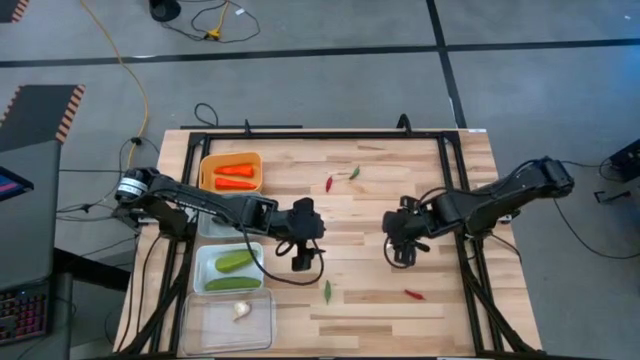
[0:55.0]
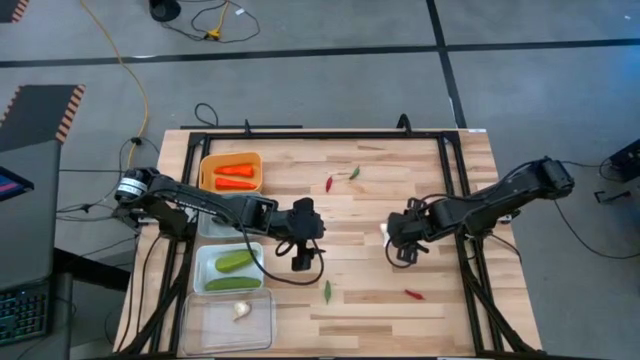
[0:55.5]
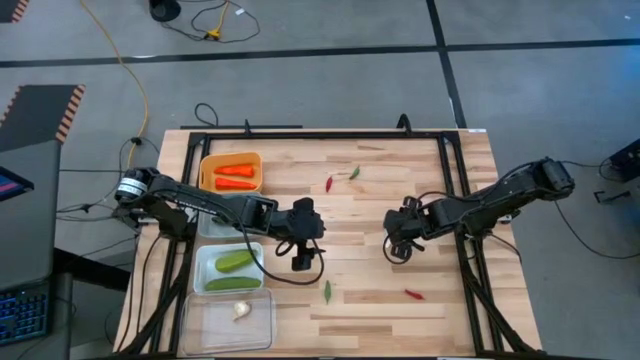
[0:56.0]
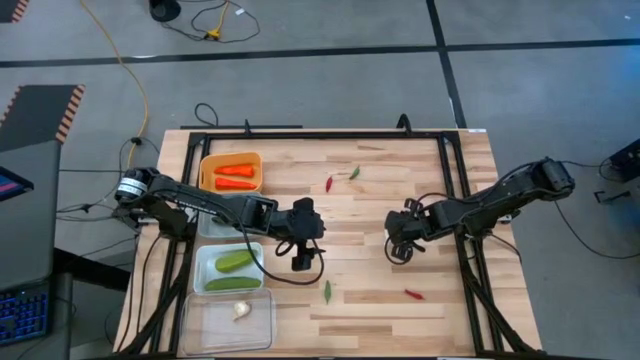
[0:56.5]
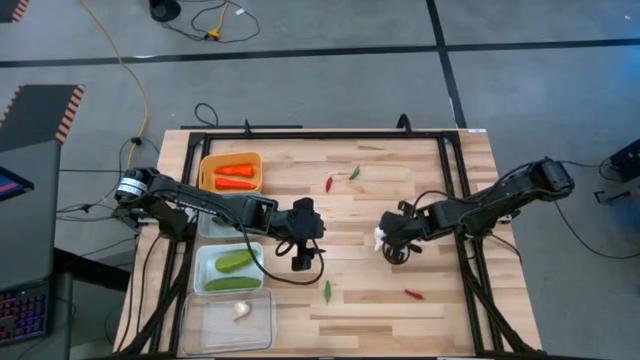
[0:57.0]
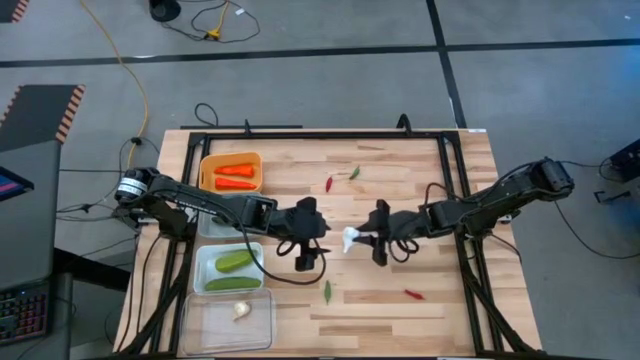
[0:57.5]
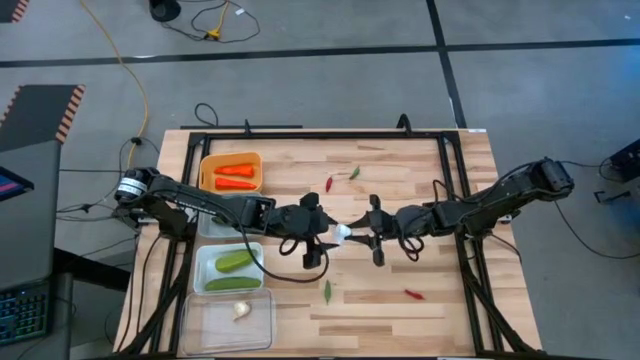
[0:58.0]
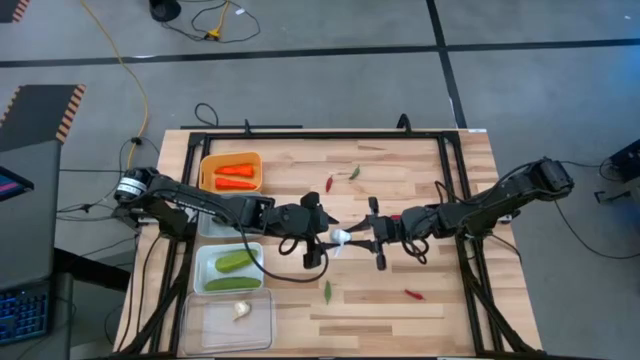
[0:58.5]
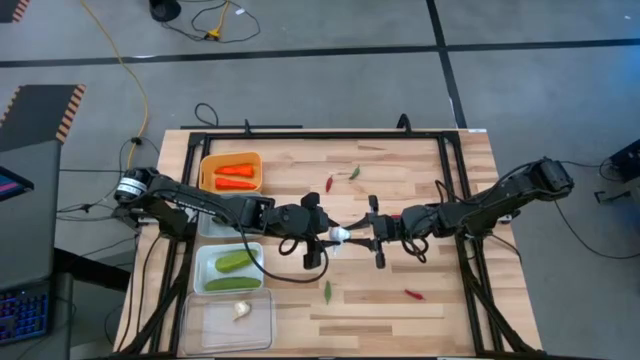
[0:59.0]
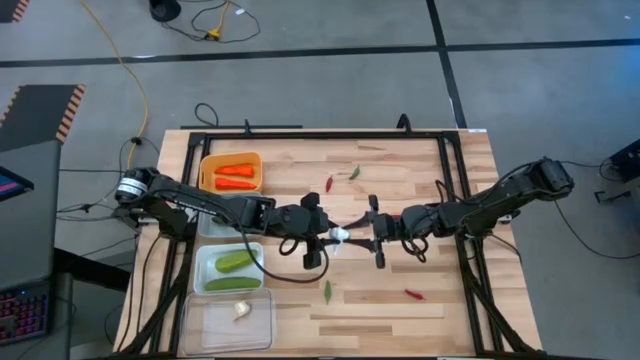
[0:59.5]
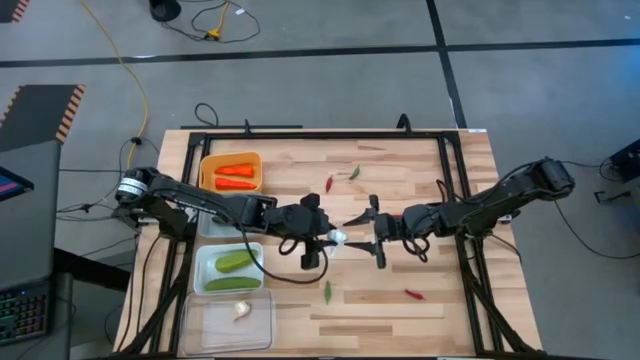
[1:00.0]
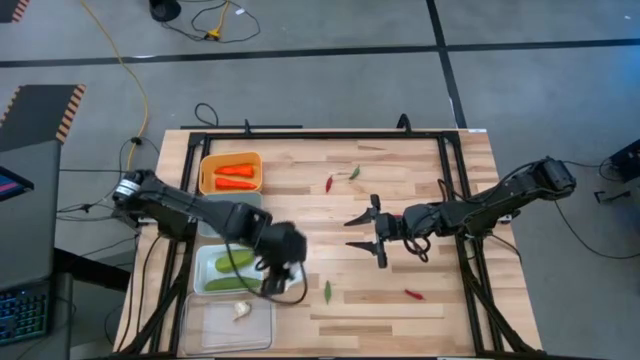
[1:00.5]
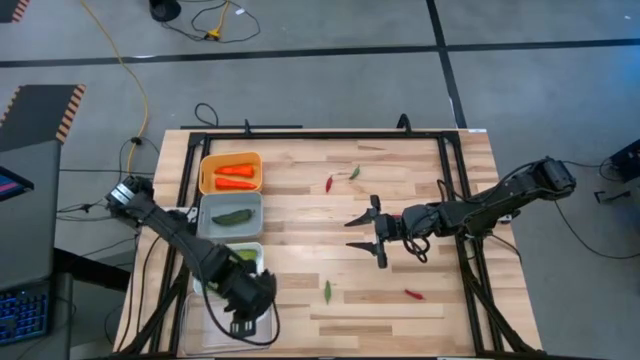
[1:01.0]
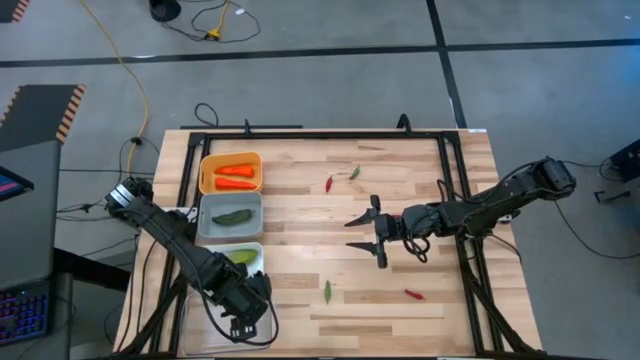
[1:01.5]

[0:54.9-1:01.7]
Task: Sort produce into baskets
Put the garlic into the transparent bin

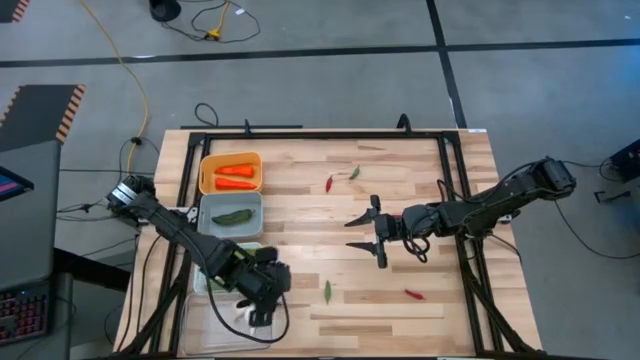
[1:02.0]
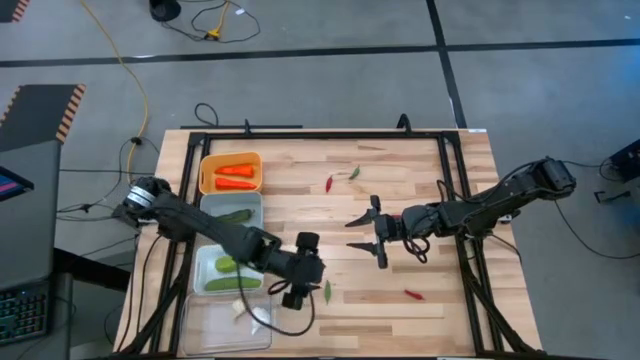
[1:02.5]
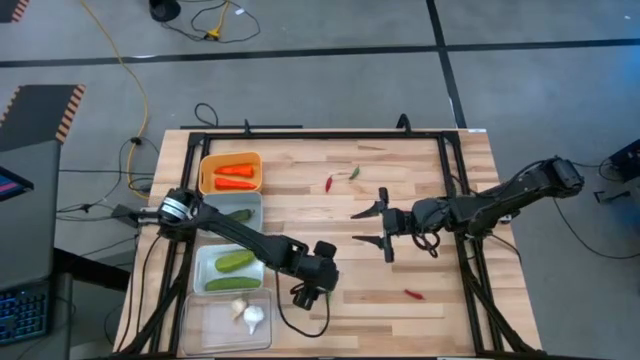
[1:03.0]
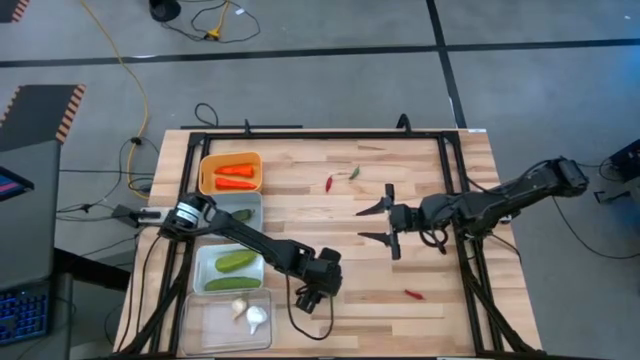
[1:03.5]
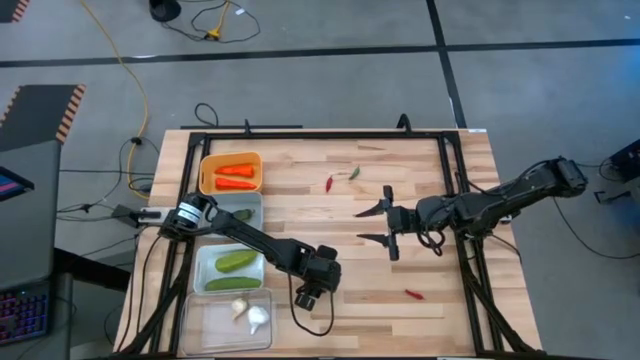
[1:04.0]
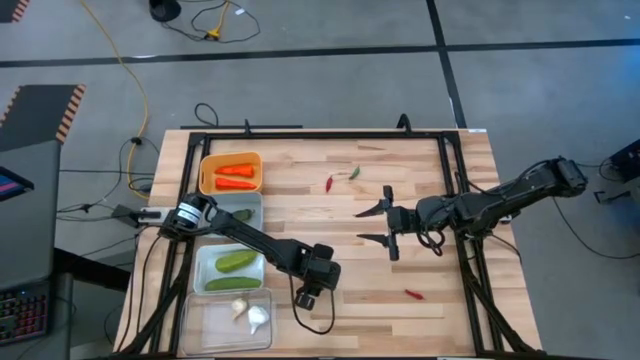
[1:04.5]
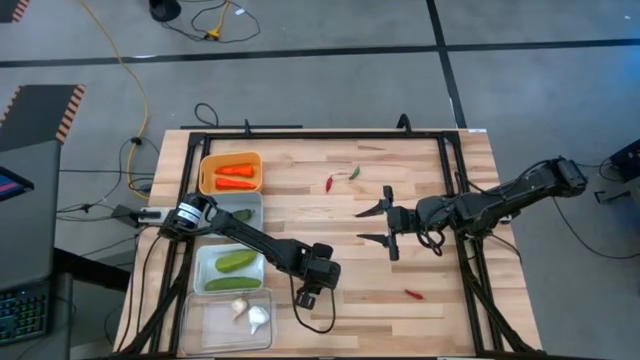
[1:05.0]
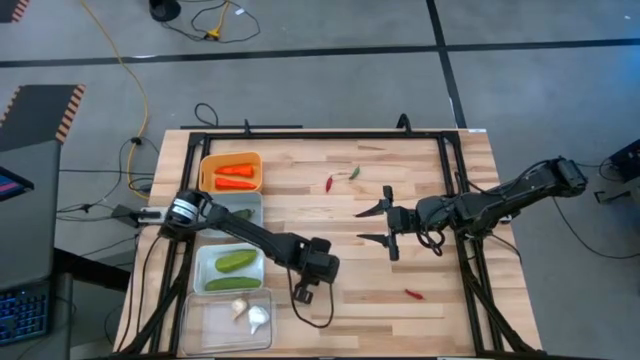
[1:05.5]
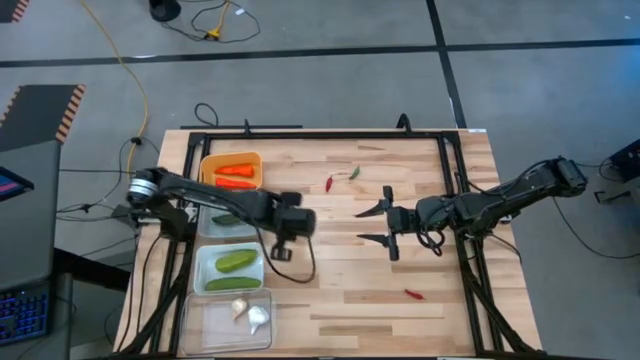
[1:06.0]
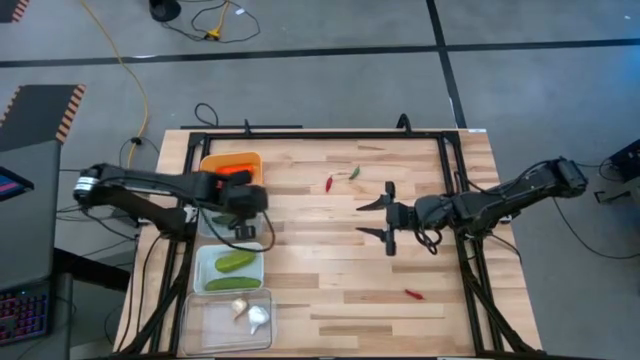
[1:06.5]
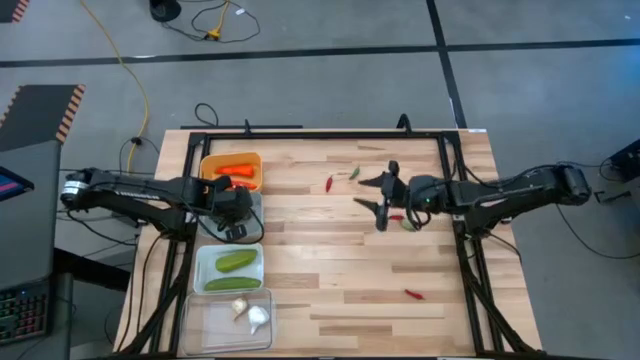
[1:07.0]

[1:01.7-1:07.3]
Put the bottom left green chili pepper into the gray bin

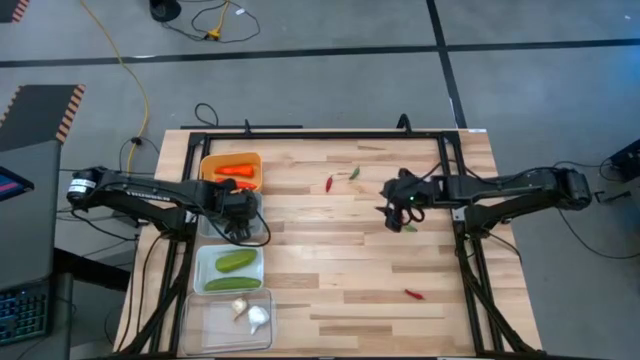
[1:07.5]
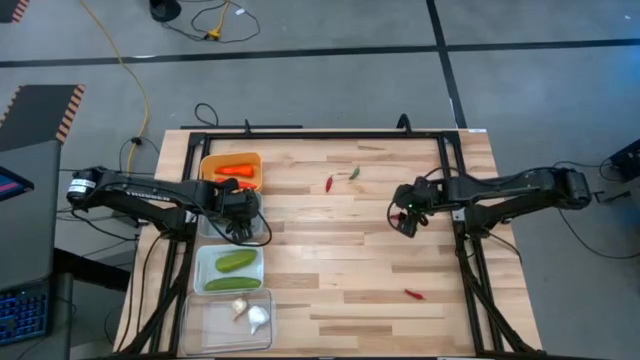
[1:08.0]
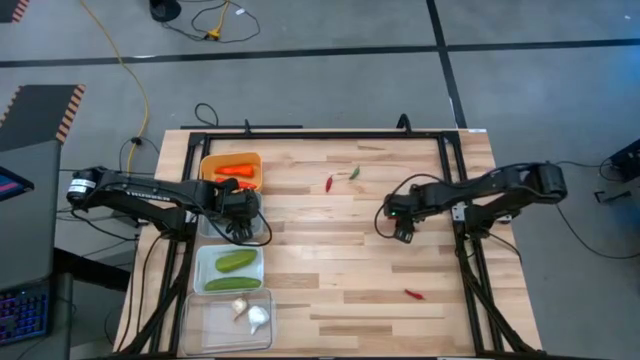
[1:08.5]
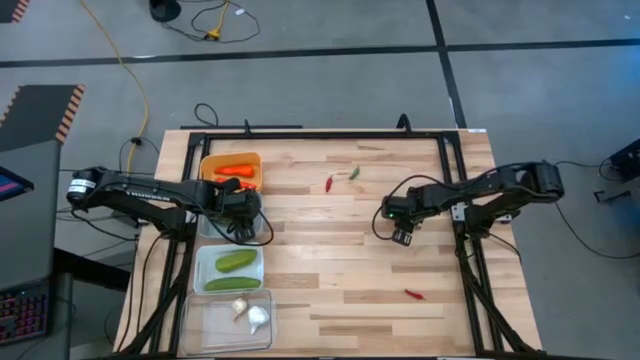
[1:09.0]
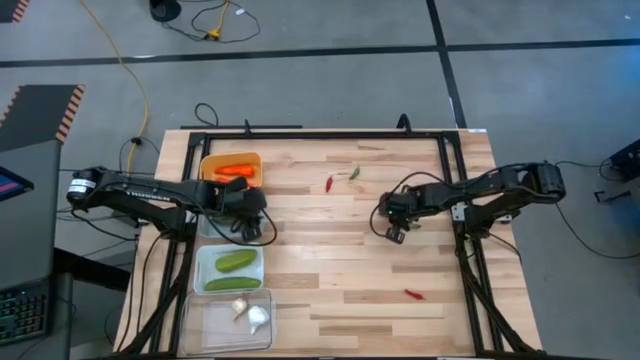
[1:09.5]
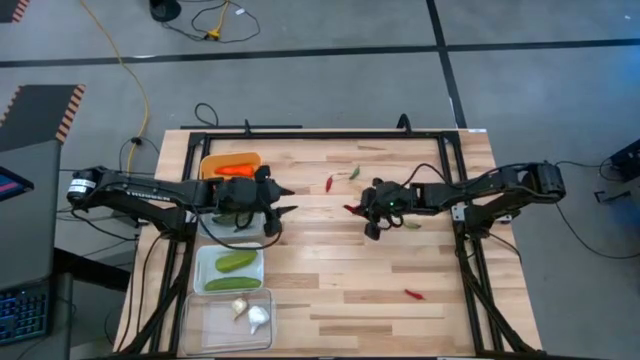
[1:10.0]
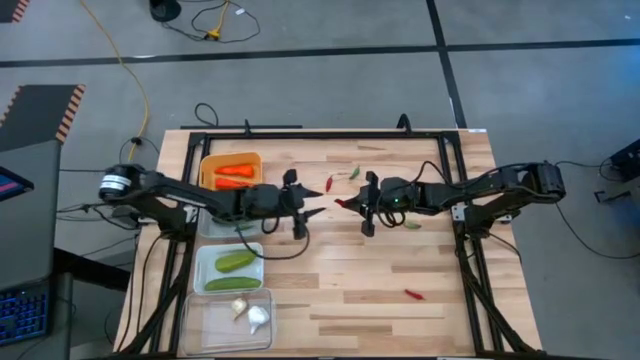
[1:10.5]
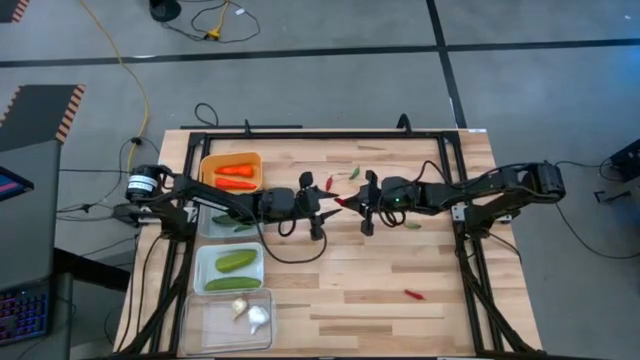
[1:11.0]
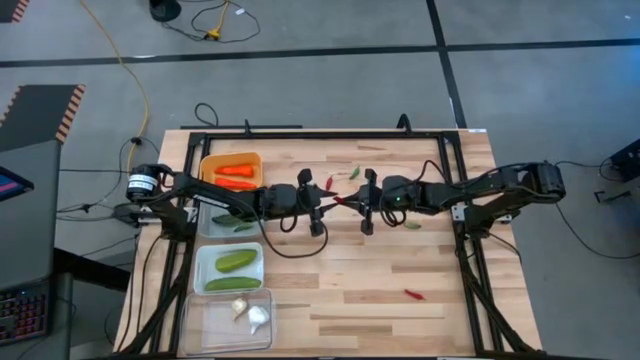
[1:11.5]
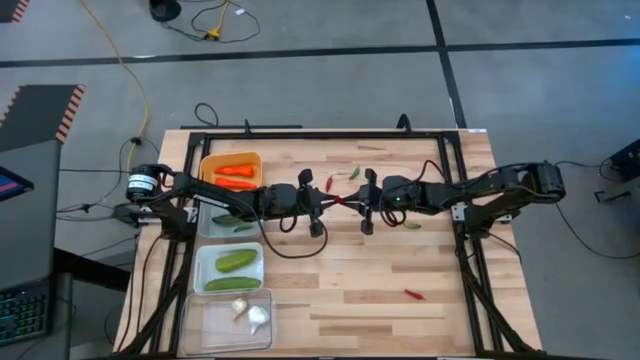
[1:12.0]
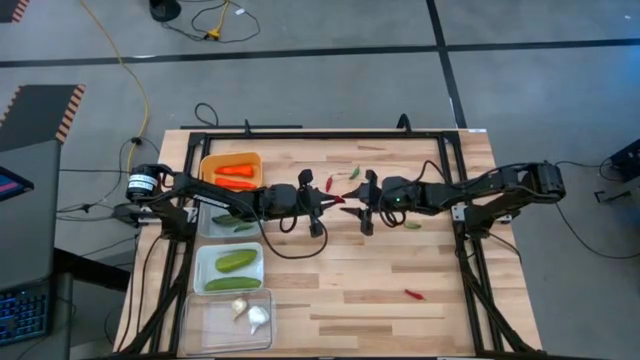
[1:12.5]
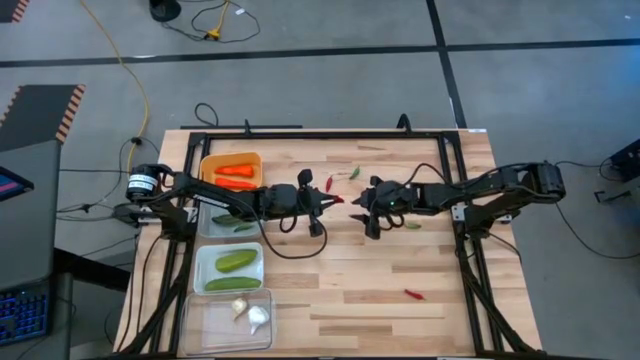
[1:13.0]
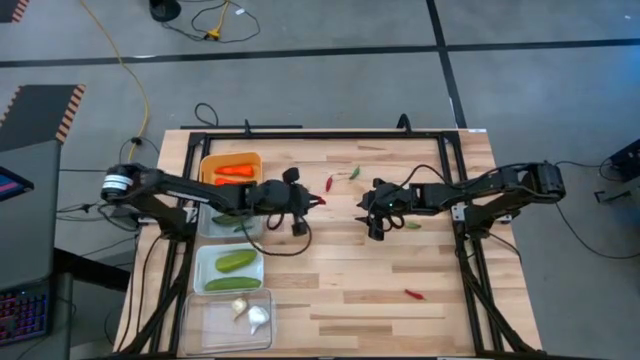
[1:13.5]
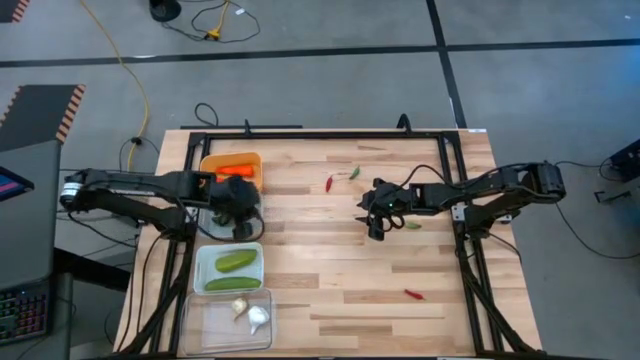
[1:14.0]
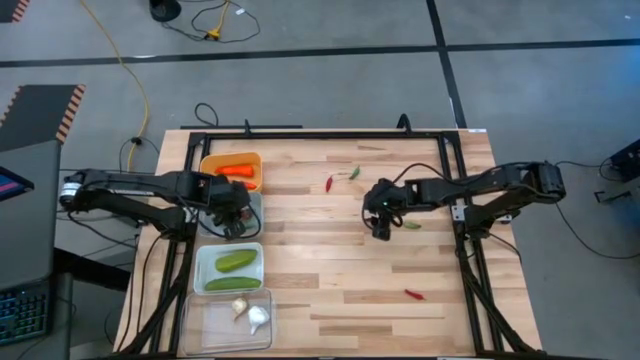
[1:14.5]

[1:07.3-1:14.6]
Put the middle right red chili pepper into the gray bin

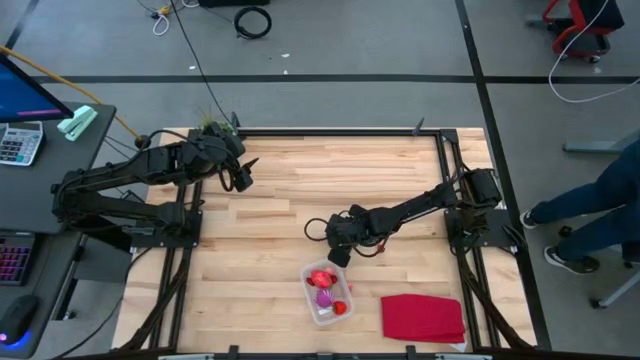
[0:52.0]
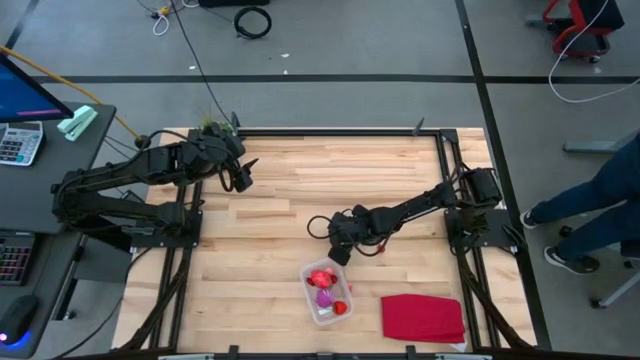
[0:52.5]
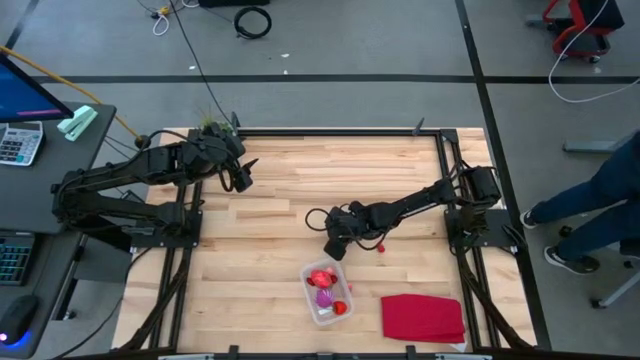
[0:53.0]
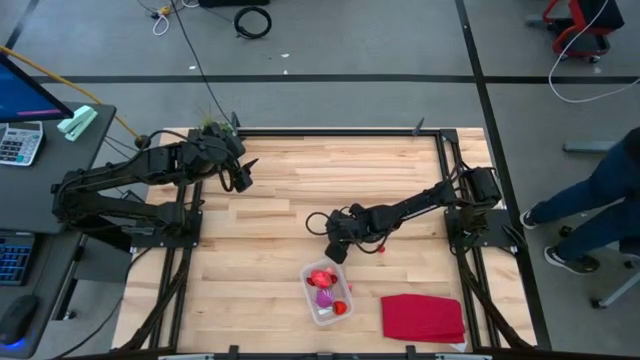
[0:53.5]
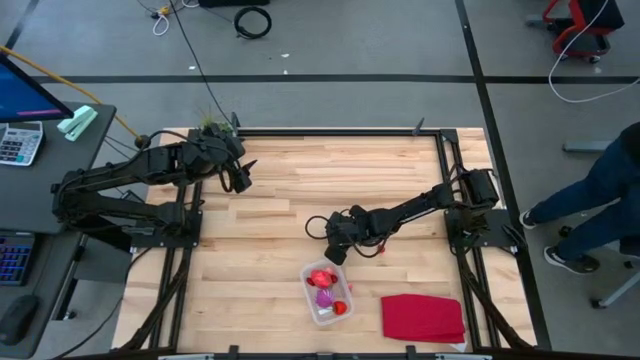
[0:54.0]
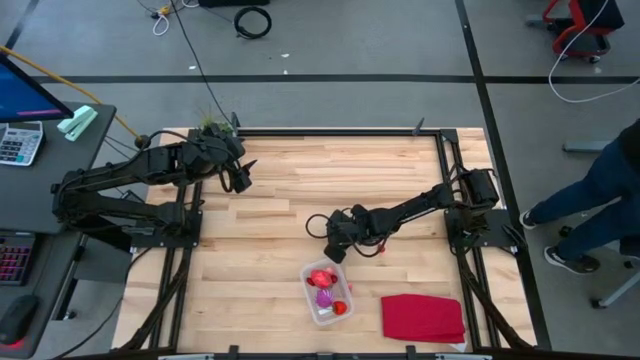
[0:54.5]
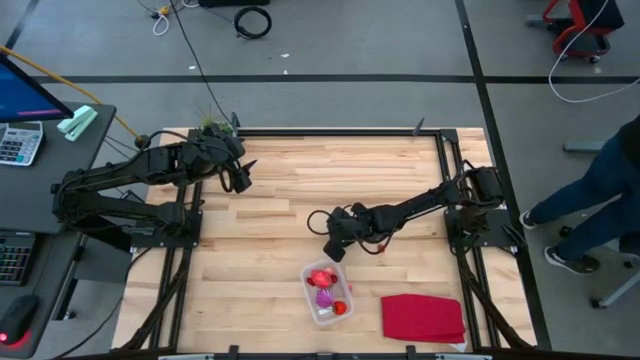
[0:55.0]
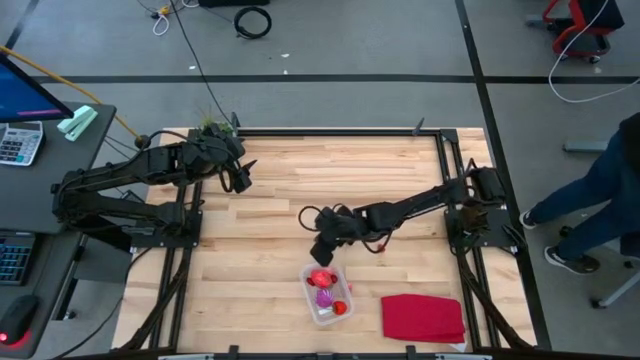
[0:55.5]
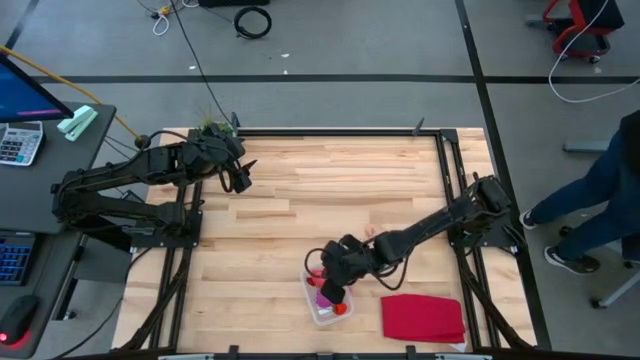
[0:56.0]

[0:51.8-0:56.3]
Task: Pick and placing Produce into tupperware
Put the left red cherry into the transparent bin
